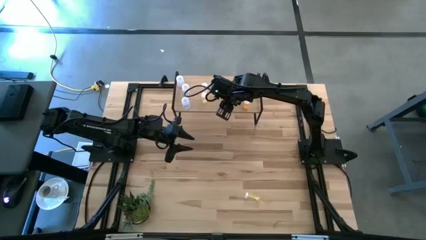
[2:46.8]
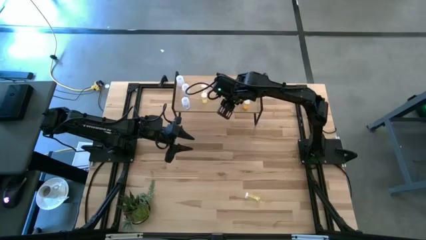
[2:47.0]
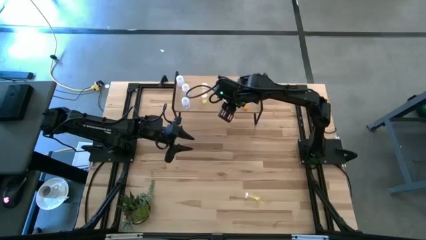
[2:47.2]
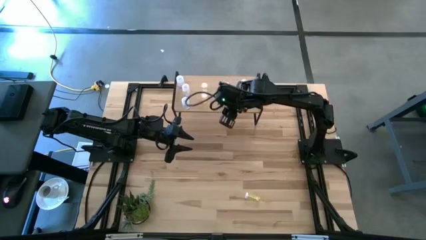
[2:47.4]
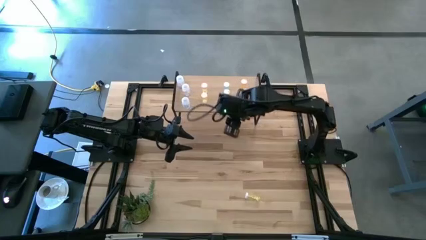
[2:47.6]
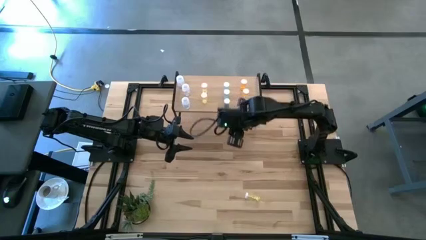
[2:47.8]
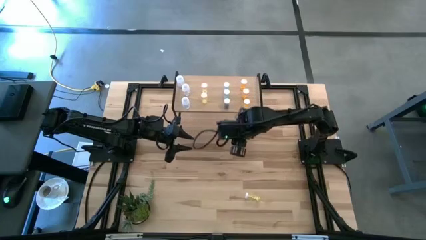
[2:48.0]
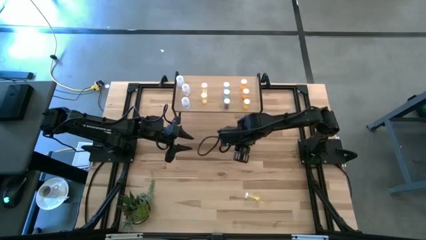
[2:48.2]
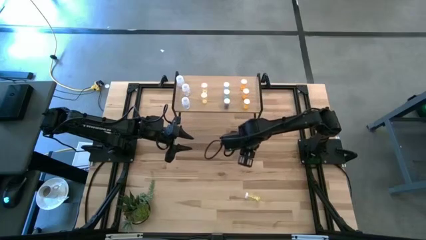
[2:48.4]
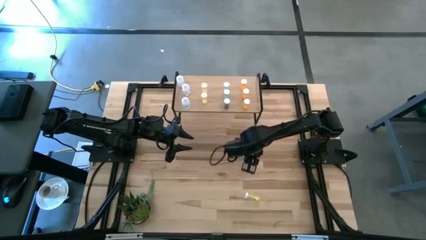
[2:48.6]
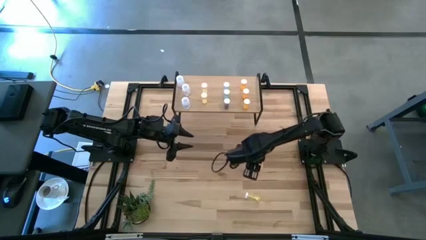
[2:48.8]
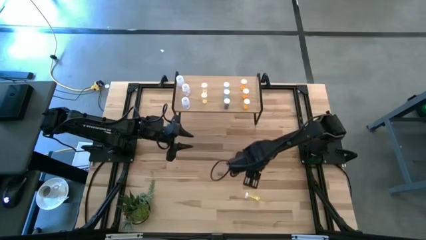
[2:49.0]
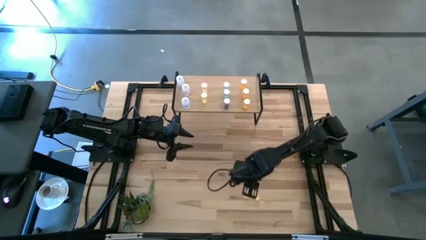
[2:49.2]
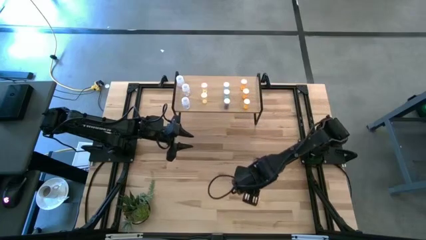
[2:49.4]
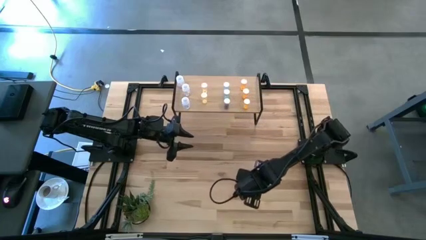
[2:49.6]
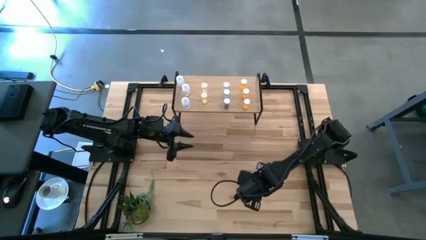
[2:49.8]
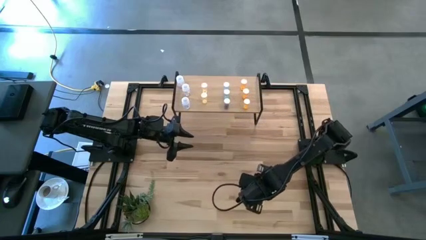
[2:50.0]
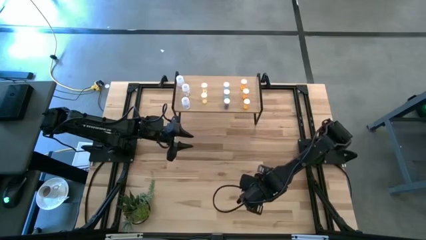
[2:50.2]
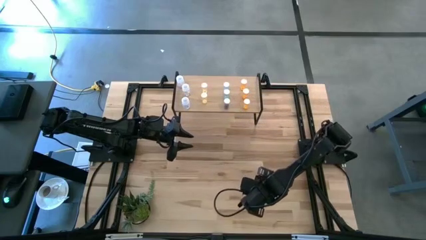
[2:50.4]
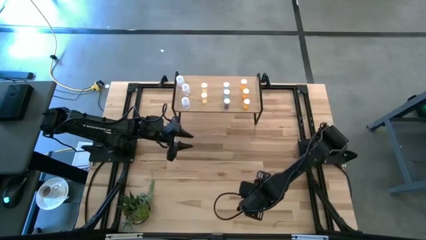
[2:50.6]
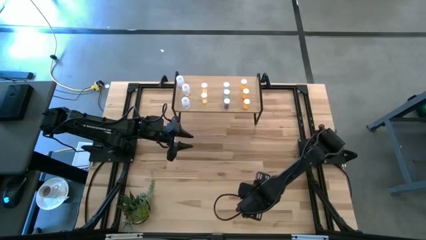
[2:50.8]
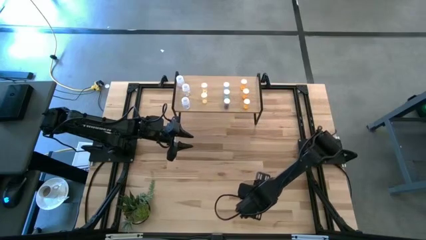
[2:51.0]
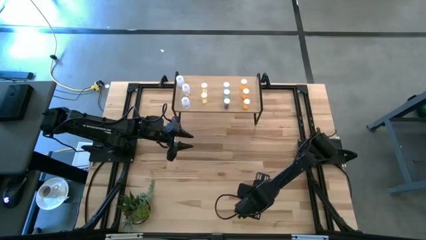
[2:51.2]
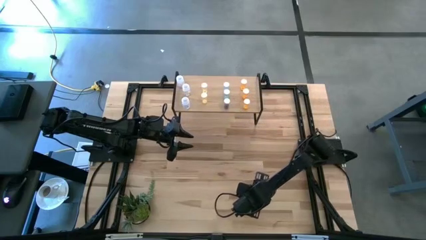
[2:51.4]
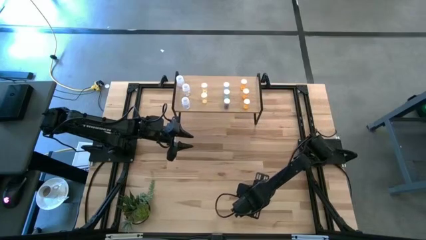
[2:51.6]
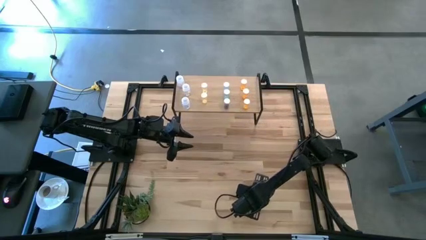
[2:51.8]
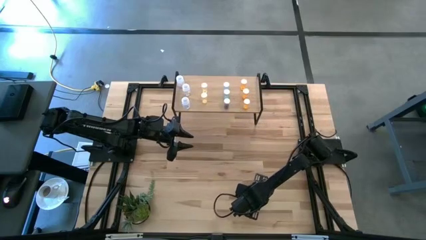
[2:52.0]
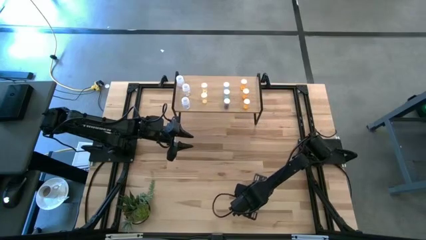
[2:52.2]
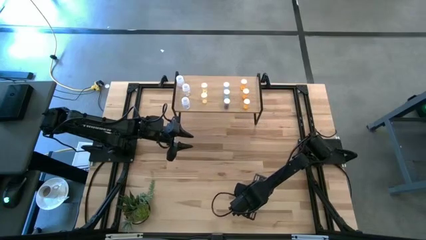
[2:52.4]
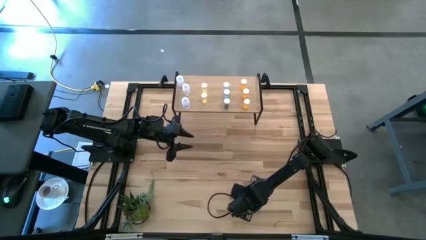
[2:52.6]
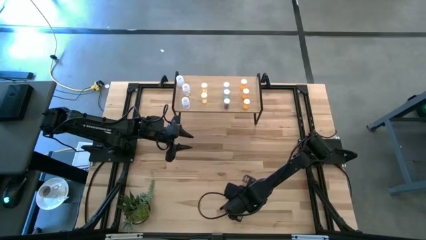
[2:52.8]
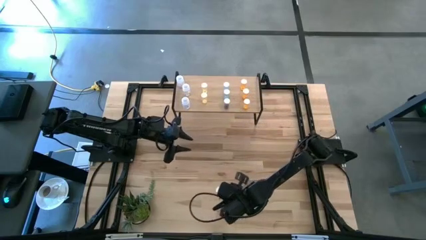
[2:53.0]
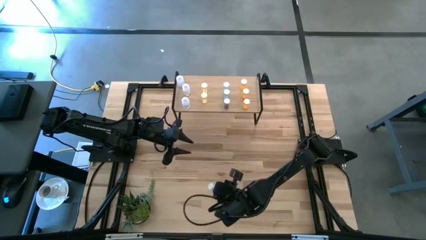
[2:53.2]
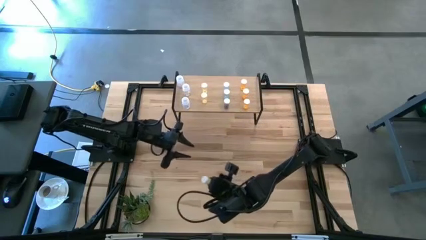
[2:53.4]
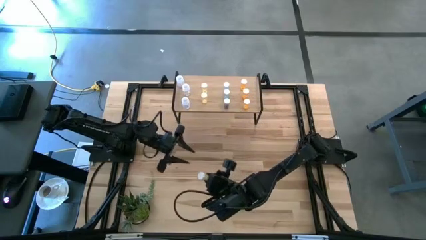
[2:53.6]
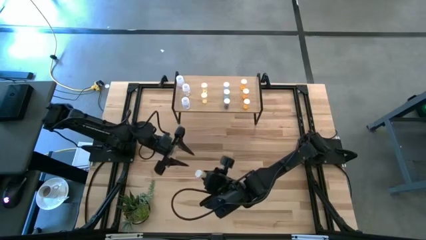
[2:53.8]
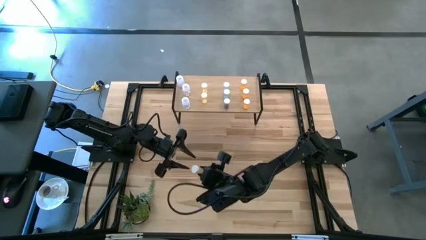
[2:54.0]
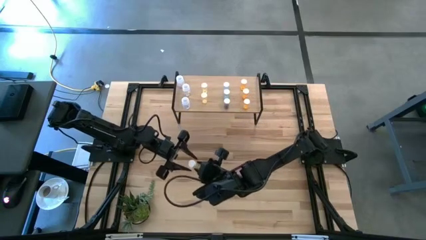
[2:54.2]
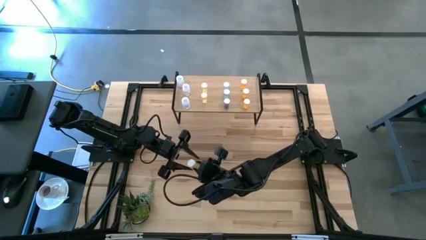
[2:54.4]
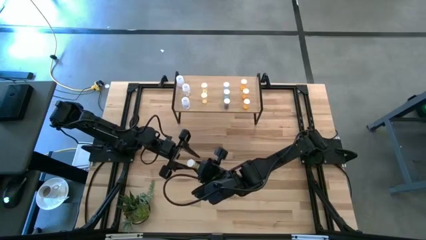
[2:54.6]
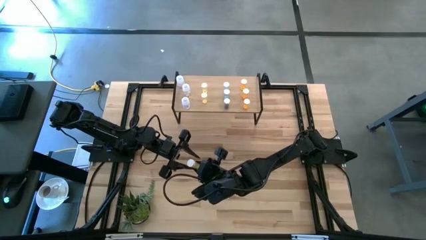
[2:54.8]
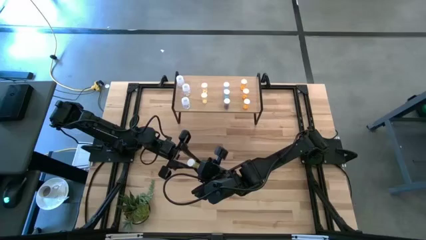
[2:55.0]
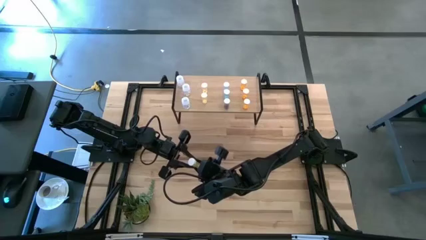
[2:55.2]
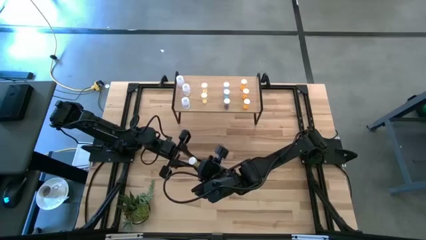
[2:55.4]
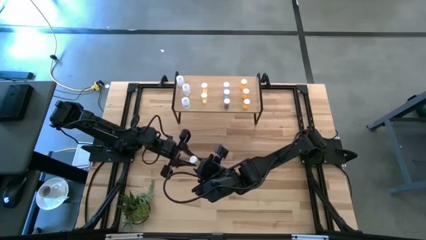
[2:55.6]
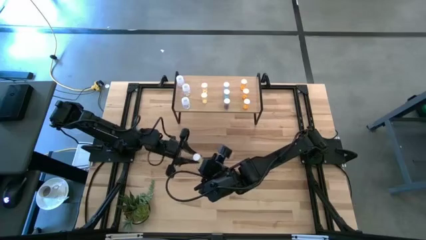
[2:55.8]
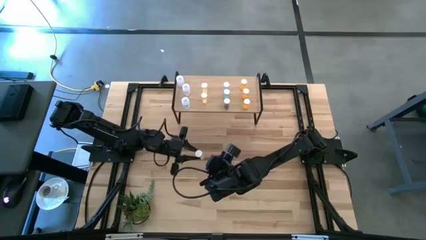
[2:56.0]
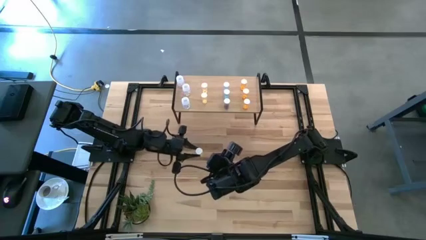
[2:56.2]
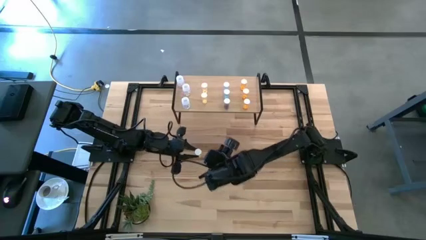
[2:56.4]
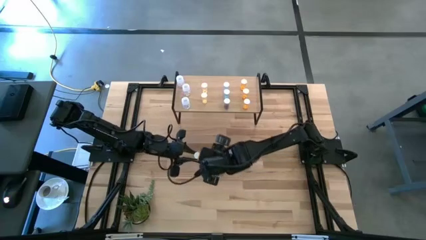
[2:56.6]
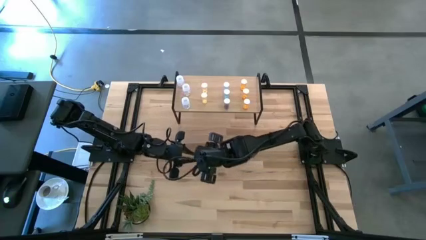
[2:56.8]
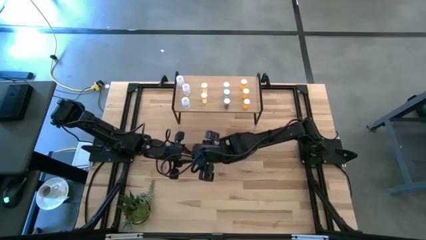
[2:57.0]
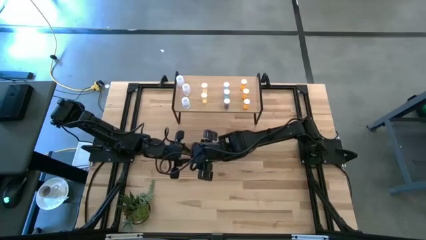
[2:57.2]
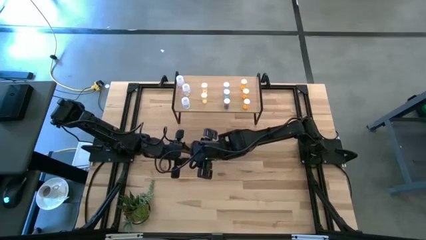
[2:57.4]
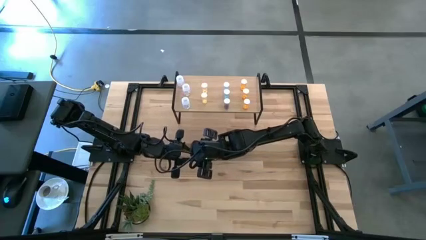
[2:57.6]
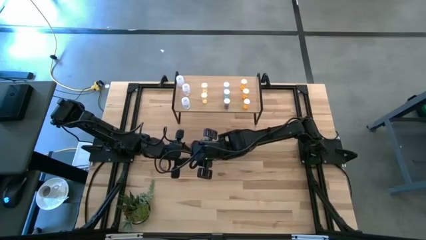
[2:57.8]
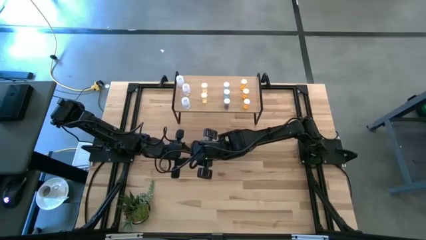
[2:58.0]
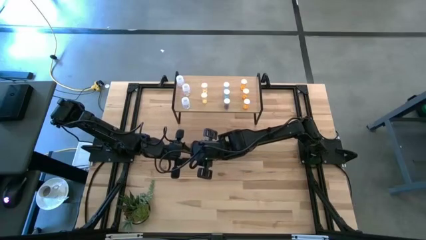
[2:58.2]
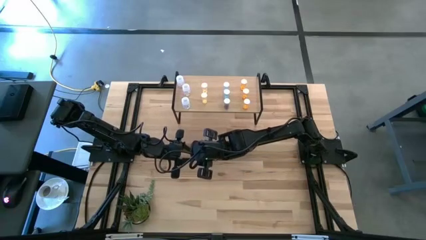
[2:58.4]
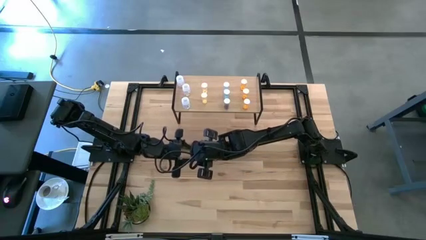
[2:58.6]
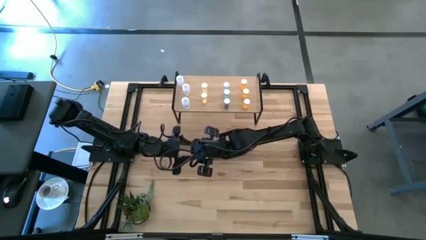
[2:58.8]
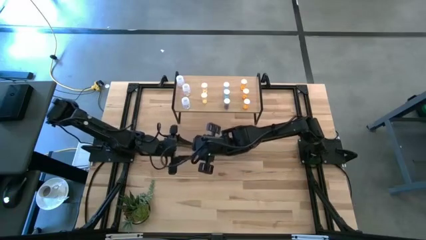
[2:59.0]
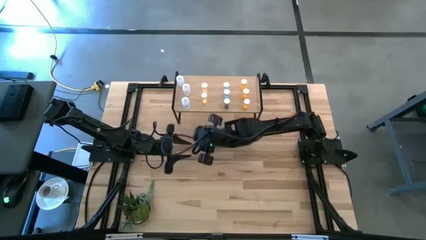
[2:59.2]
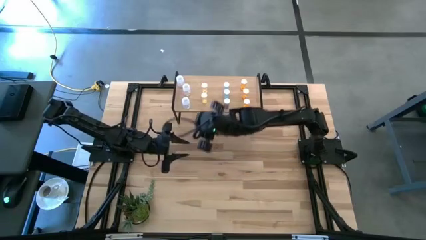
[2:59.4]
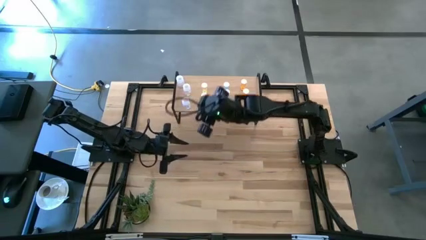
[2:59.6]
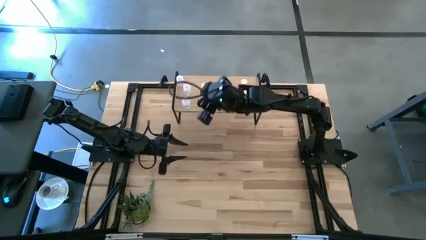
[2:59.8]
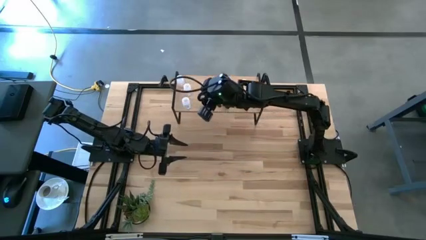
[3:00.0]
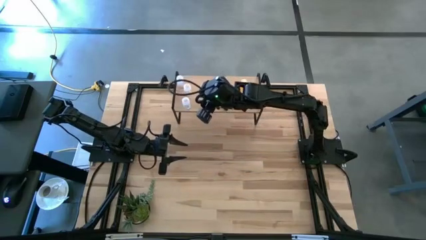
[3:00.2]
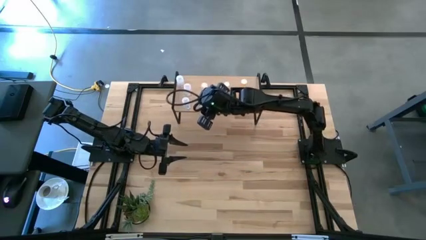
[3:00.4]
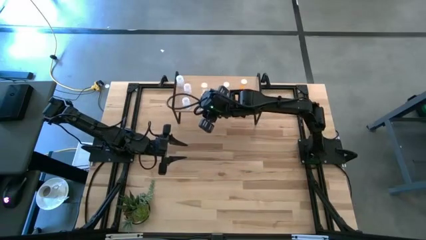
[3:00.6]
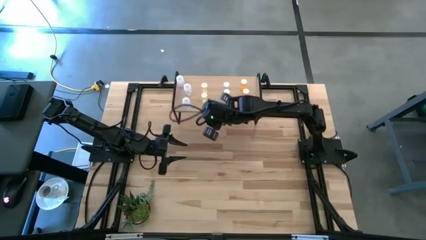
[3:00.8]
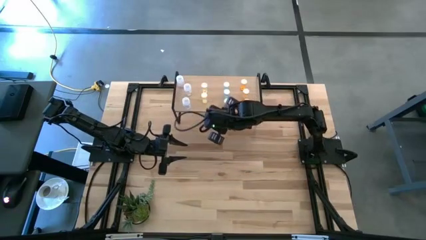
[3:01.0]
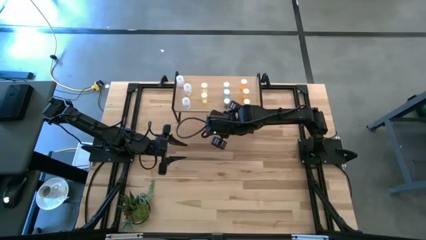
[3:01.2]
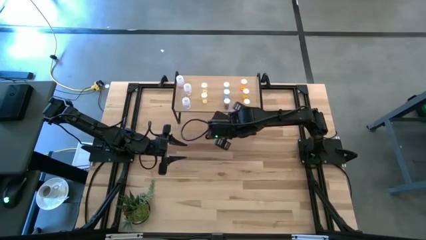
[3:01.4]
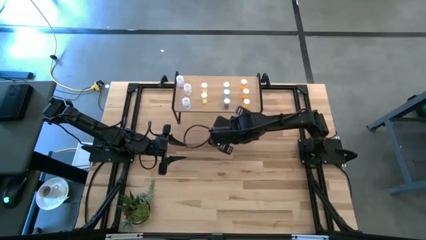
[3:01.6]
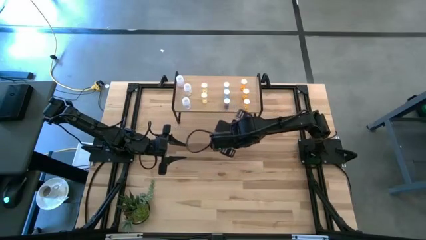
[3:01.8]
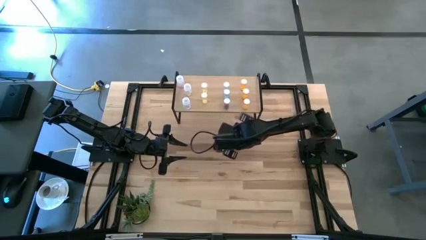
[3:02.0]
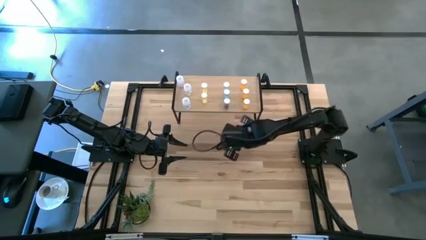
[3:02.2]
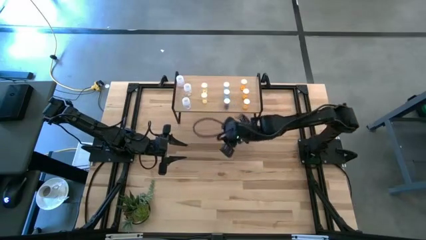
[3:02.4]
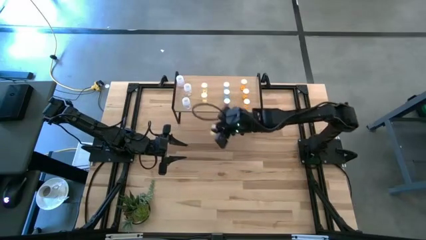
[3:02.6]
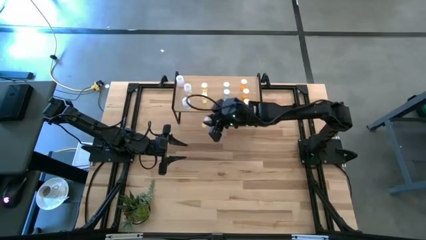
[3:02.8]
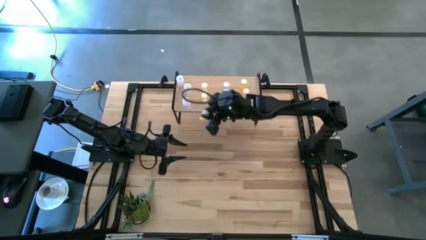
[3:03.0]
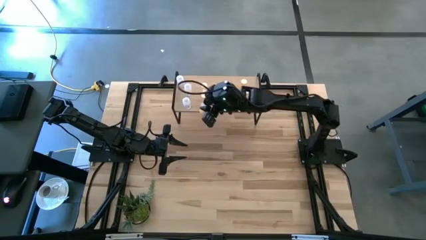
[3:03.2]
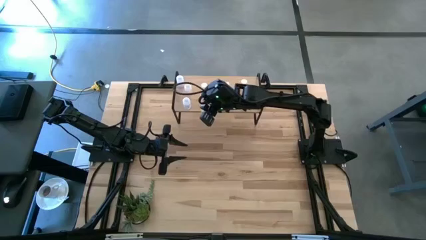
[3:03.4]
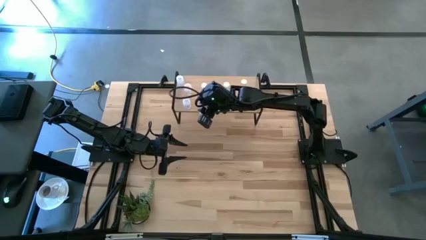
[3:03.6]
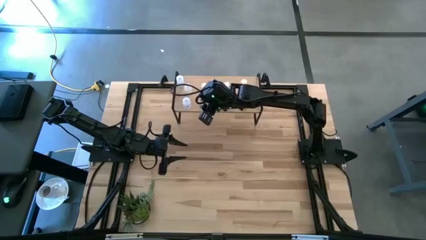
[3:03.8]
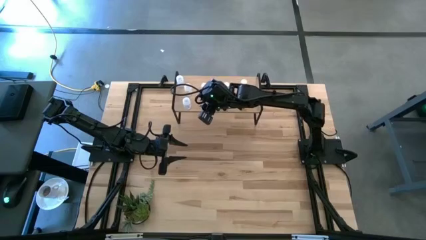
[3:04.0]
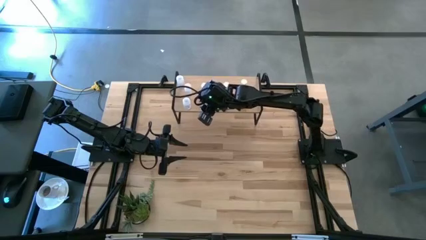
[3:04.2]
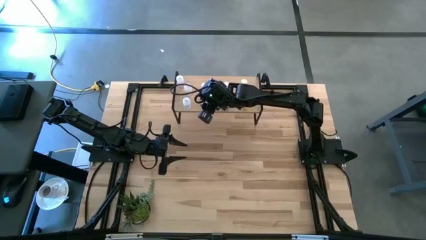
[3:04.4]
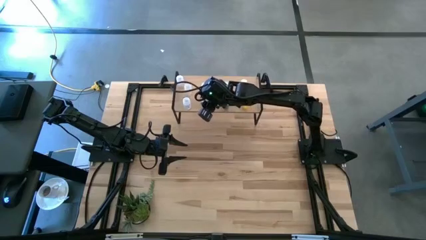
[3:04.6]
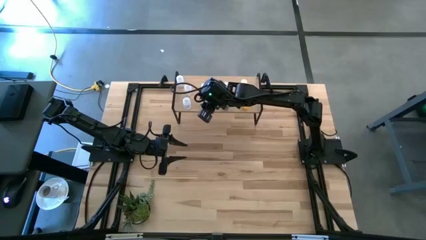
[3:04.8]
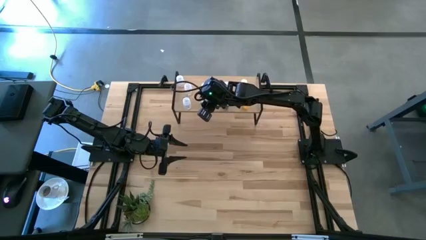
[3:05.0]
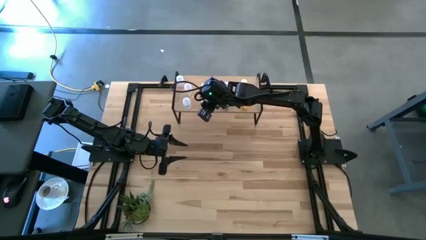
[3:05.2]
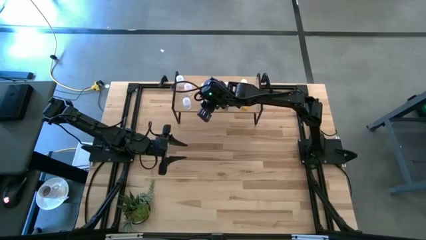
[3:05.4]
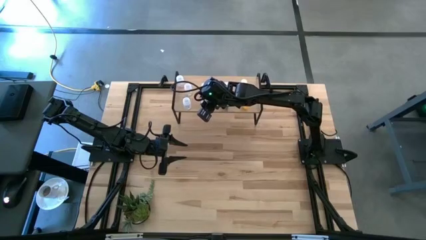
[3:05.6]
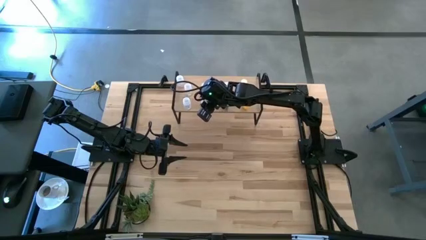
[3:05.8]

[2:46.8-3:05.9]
Task: Pick and place medicine bottles onto shelf by color
Put the yellow pill bottle on the shelf aligned with the other yellow pill bottles
